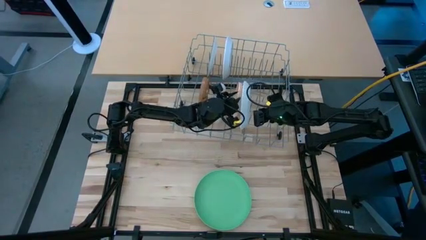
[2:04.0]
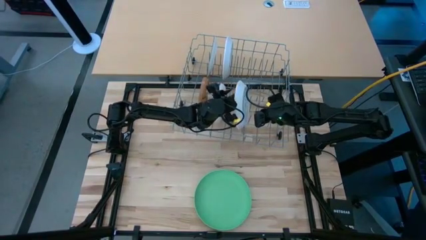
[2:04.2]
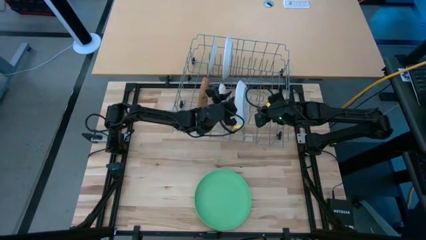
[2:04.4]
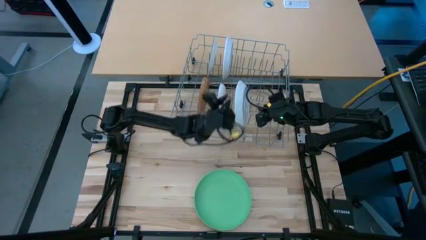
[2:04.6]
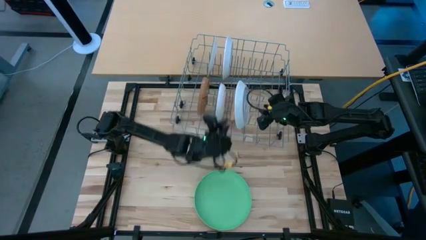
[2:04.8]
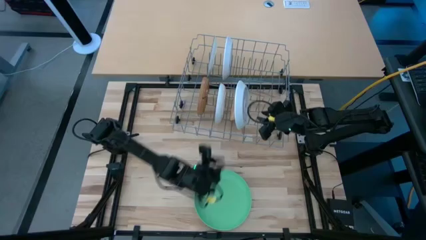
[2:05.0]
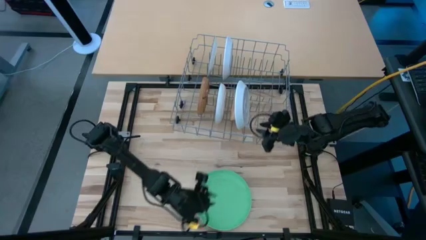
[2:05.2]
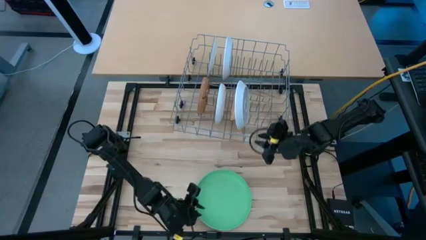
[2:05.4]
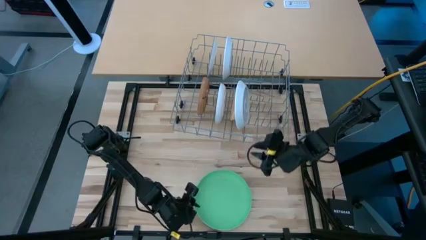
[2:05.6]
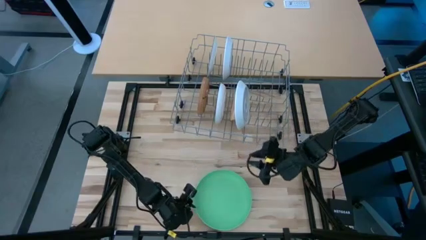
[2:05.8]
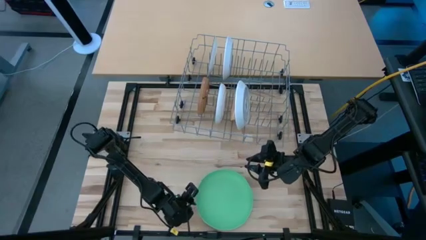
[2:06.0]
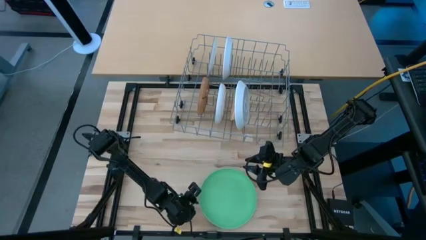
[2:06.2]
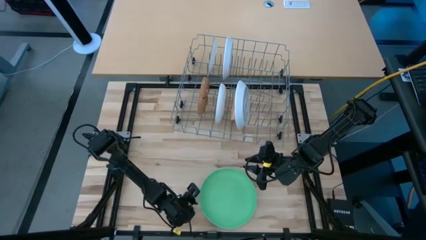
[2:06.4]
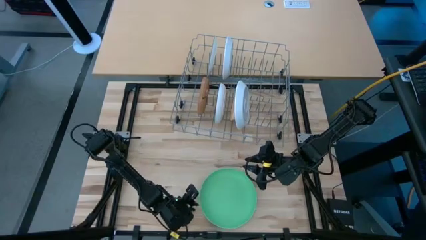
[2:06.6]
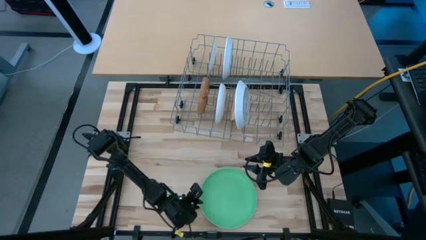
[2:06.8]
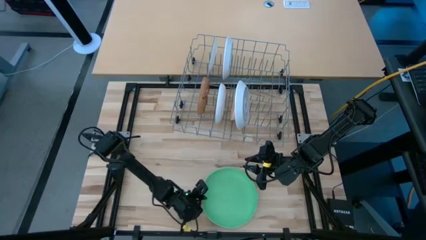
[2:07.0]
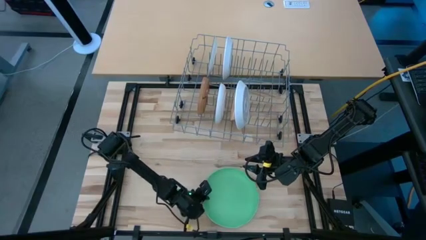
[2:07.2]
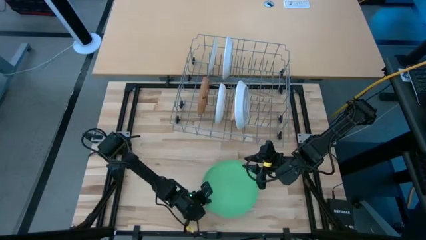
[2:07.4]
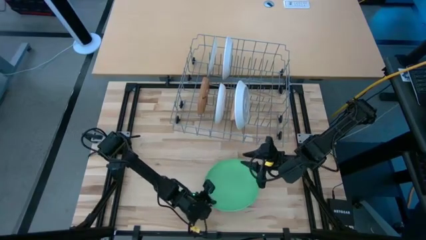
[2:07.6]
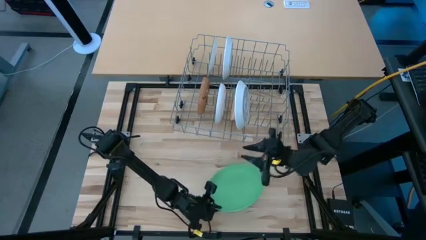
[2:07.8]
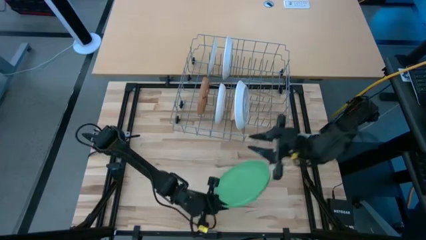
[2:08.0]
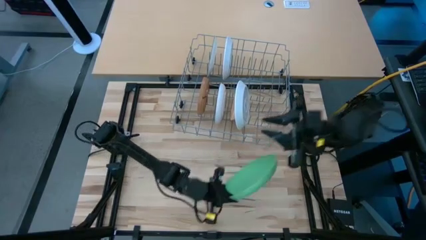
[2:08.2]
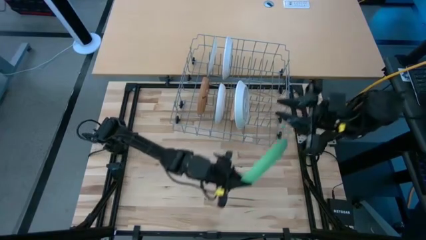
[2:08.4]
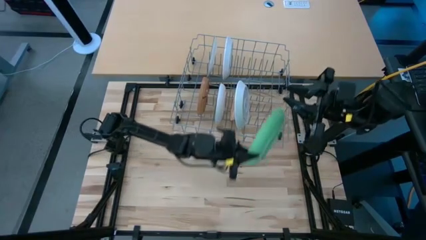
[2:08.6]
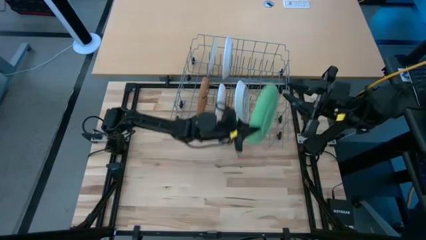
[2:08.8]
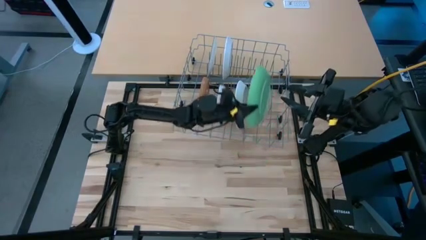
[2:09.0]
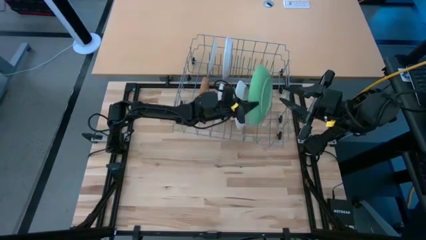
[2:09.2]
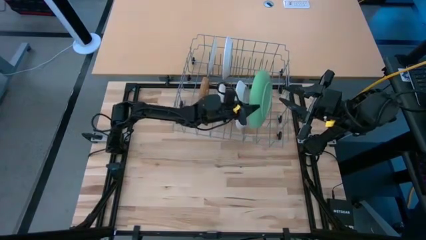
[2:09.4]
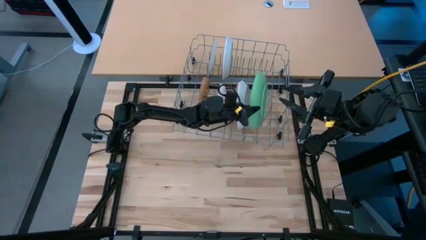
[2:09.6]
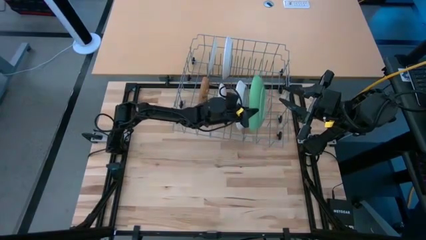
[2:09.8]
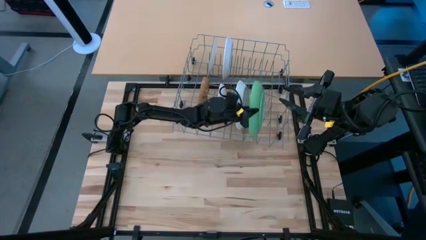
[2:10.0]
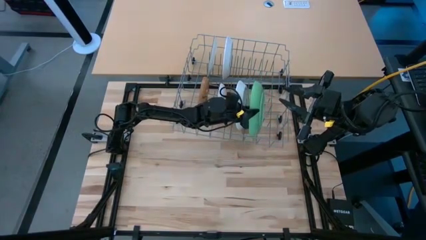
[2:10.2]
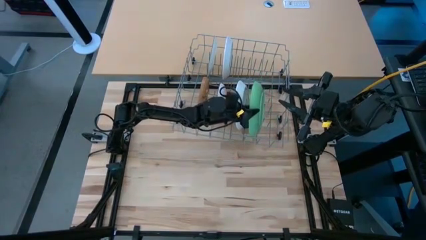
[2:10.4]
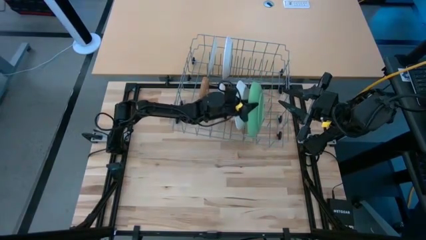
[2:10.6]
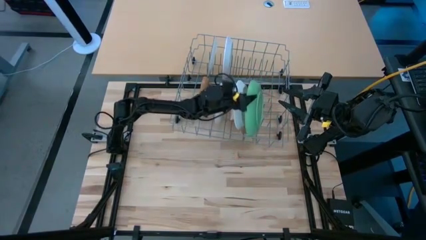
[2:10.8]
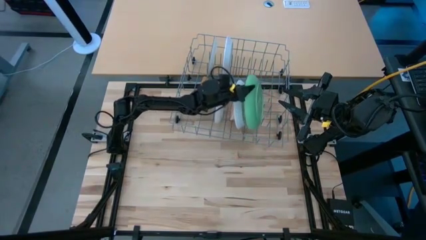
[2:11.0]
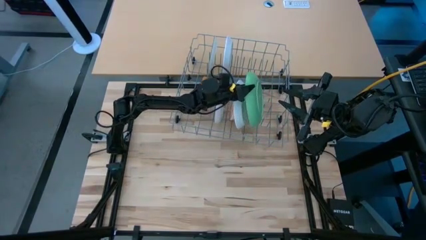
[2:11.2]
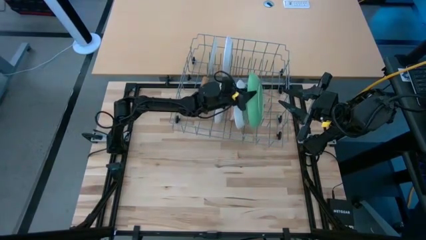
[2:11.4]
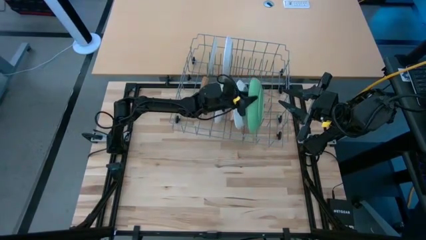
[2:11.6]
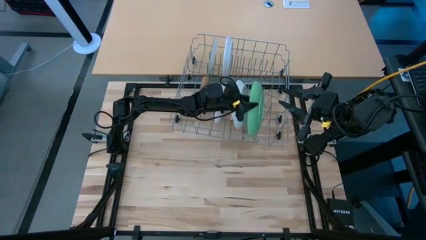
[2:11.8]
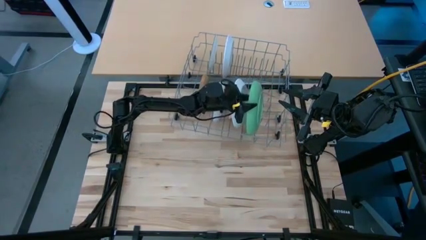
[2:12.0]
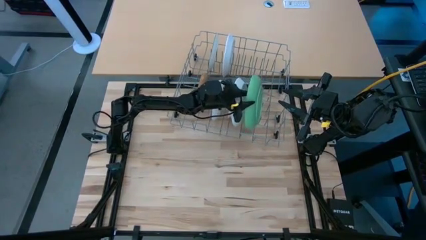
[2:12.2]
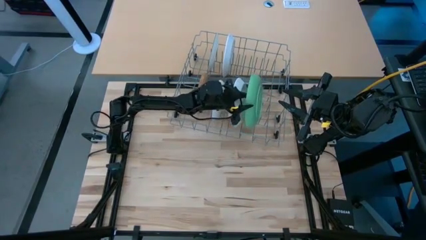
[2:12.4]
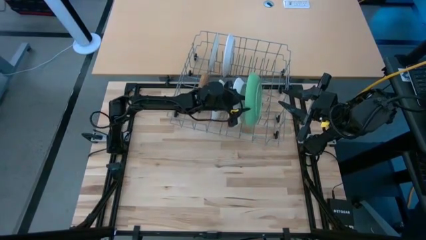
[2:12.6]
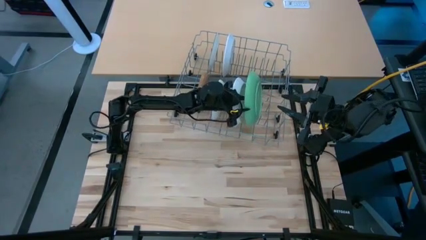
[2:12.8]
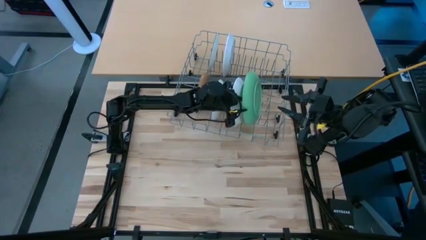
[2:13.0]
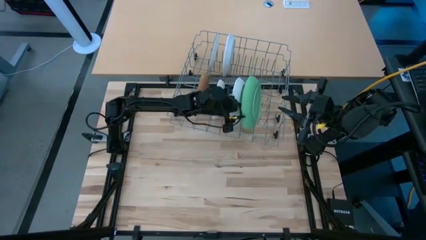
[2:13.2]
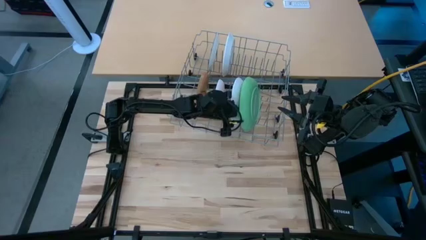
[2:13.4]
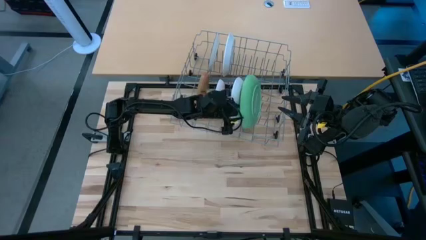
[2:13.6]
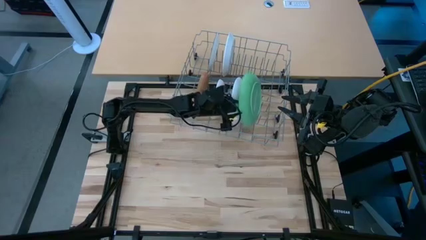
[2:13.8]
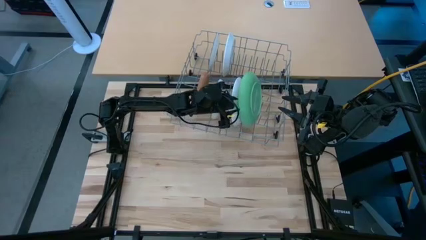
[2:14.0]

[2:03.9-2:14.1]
Task: Sort dishes
Put the green plate into the gray dishwasher rack

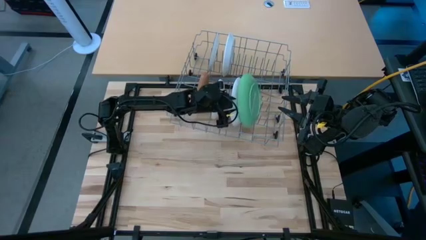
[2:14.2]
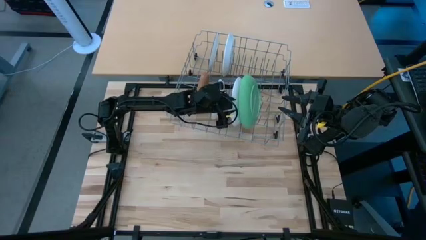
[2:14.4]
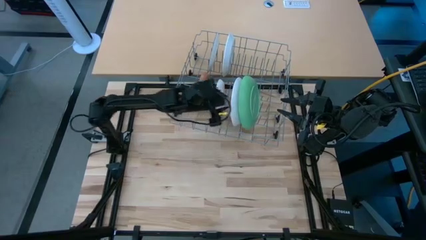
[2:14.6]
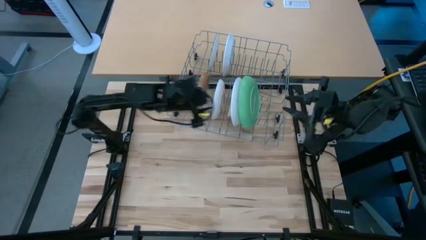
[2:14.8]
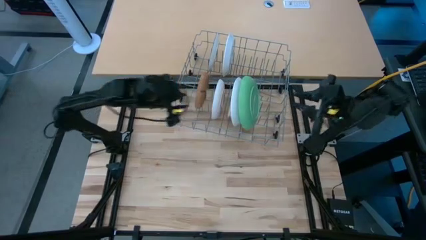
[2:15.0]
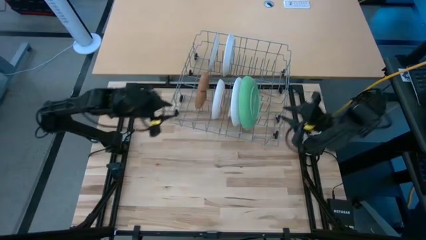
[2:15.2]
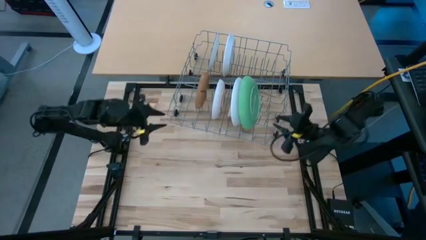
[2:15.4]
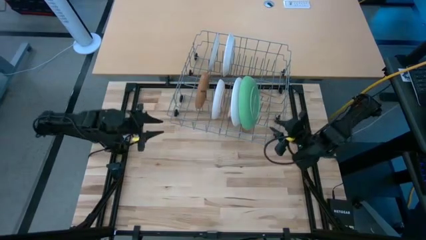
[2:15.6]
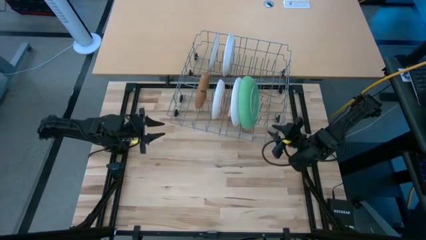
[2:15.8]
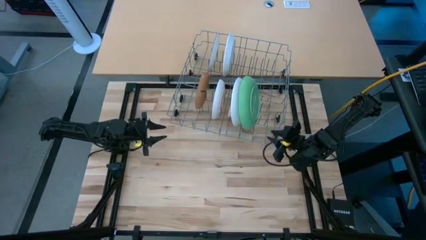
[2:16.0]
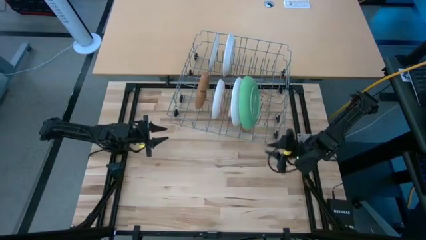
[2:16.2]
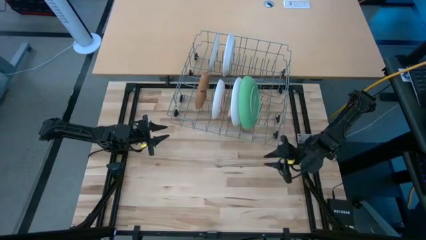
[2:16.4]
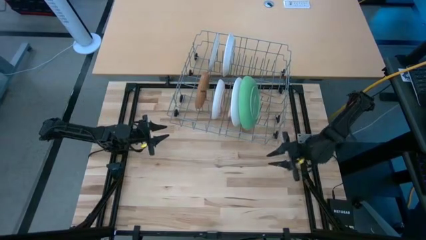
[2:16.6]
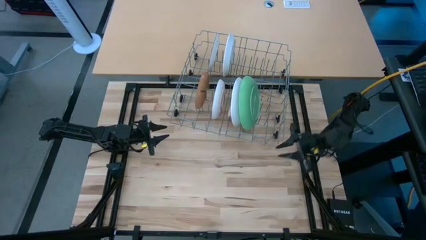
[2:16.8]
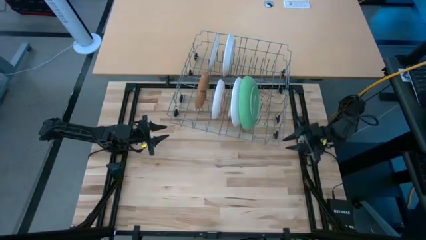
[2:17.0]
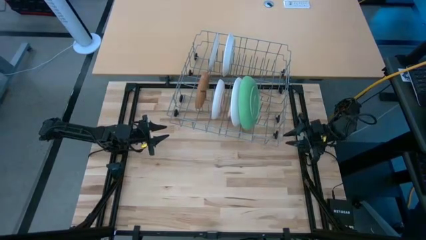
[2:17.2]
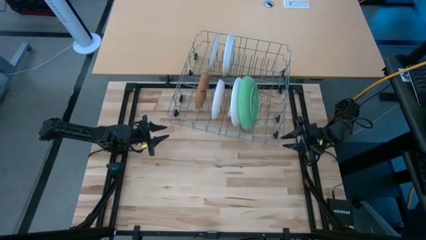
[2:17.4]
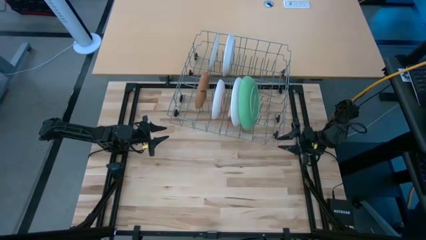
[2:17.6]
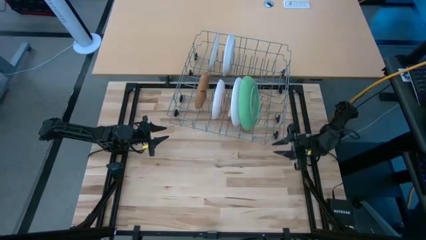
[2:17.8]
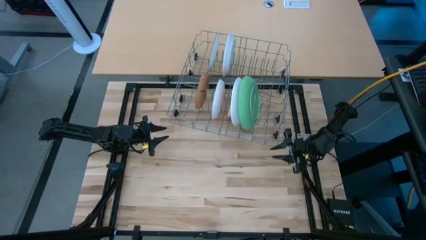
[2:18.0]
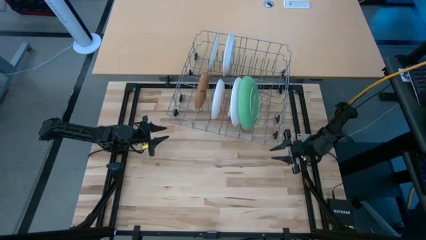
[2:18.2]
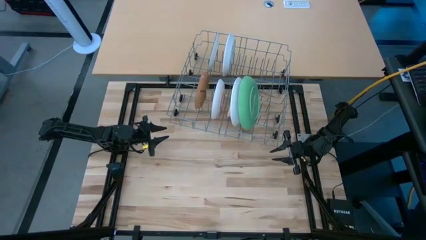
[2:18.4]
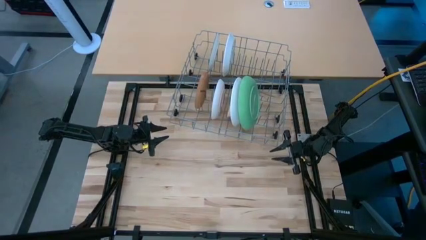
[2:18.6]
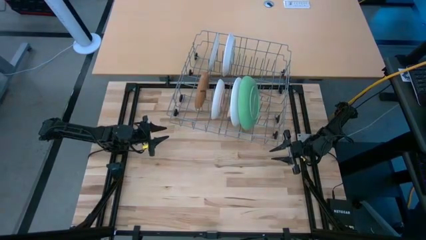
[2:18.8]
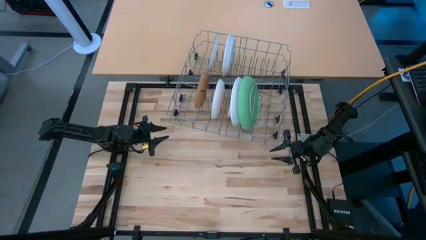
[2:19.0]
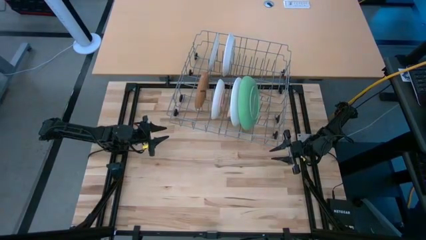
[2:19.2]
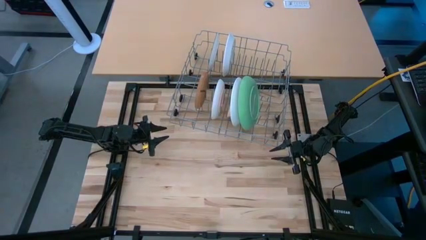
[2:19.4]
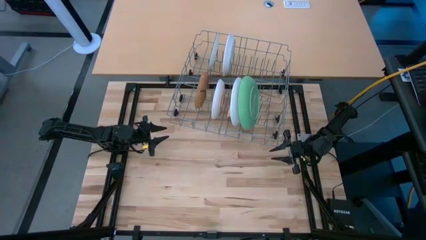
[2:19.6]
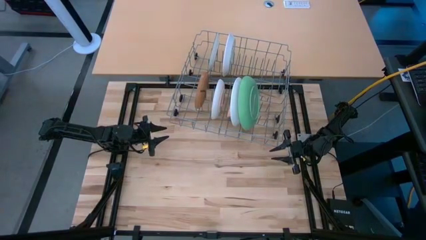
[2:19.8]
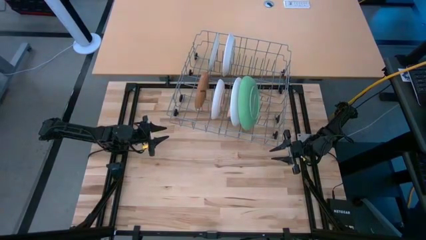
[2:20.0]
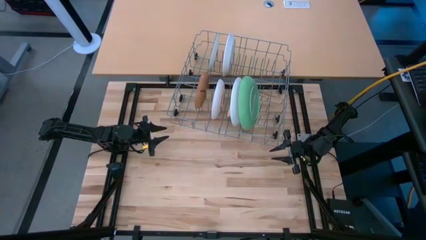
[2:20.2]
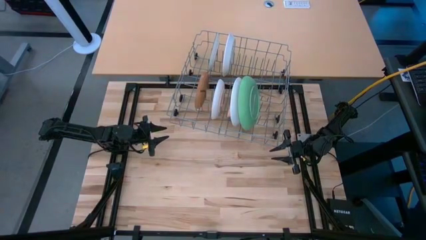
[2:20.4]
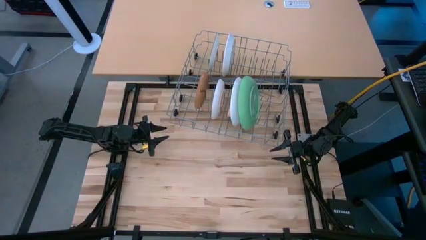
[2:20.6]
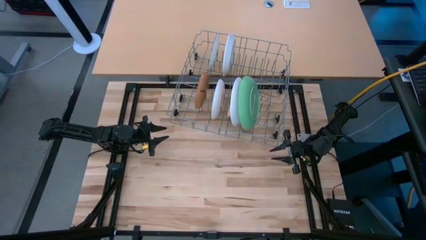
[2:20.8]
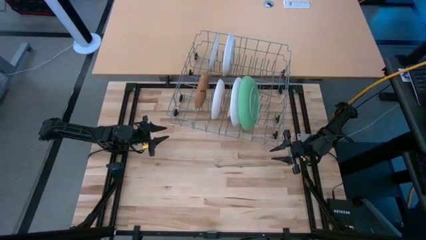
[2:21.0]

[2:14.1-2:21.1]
Return to Home Position
